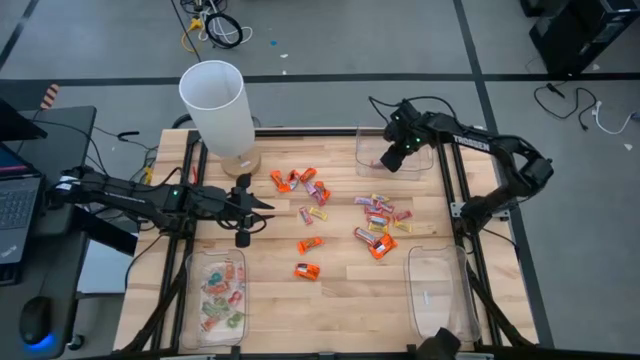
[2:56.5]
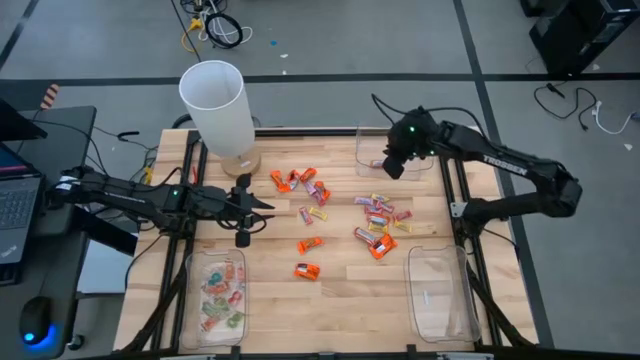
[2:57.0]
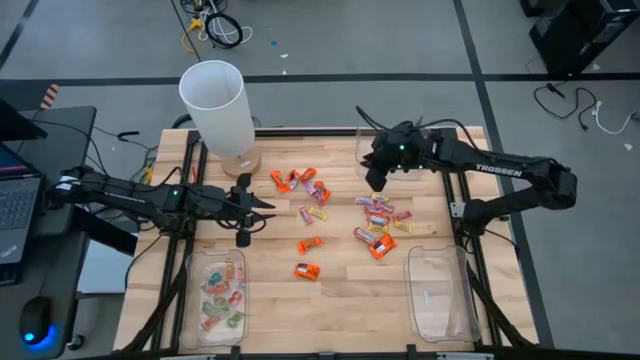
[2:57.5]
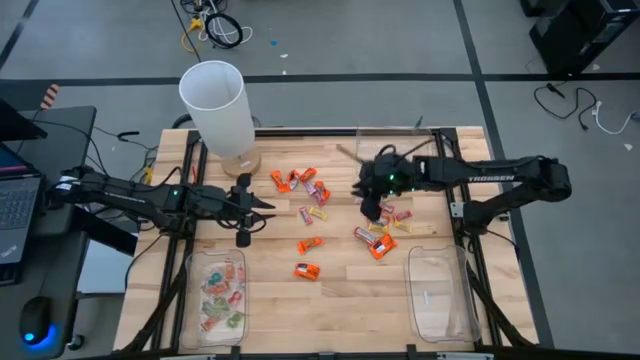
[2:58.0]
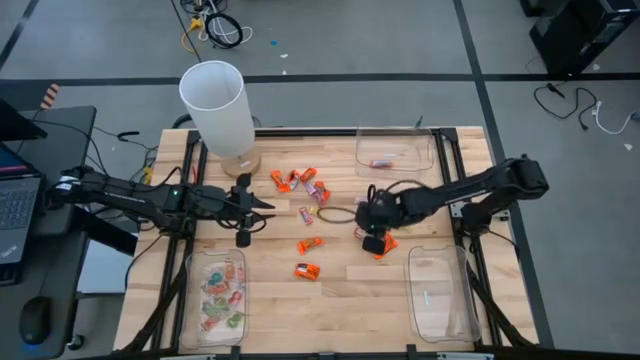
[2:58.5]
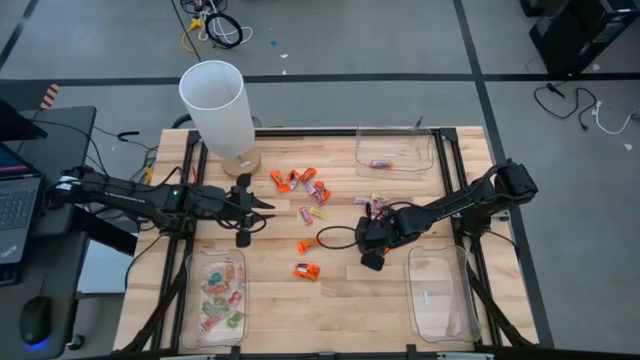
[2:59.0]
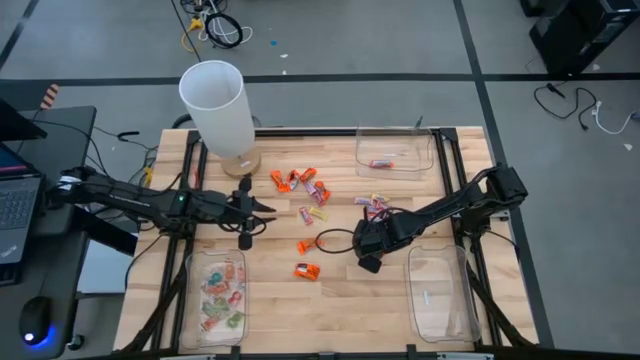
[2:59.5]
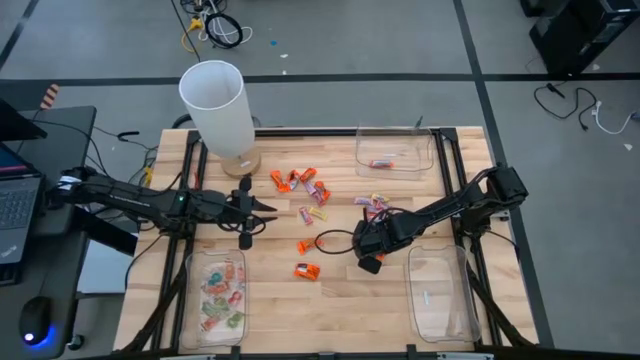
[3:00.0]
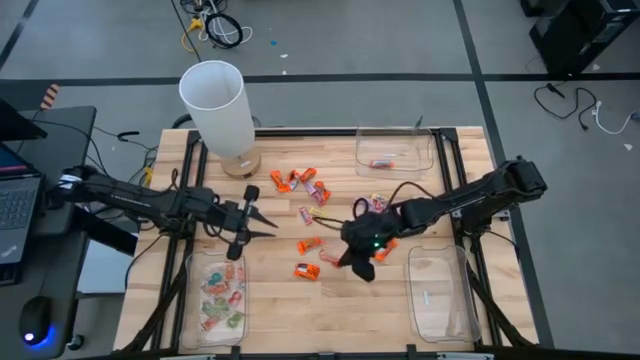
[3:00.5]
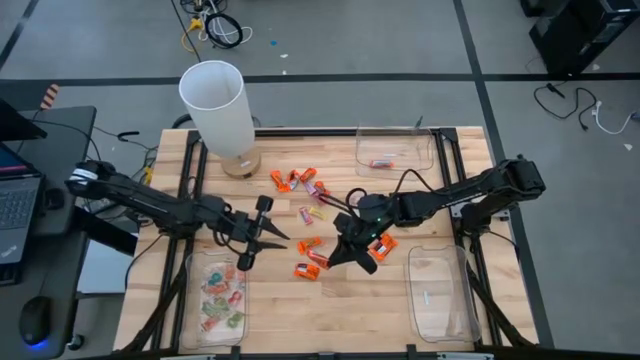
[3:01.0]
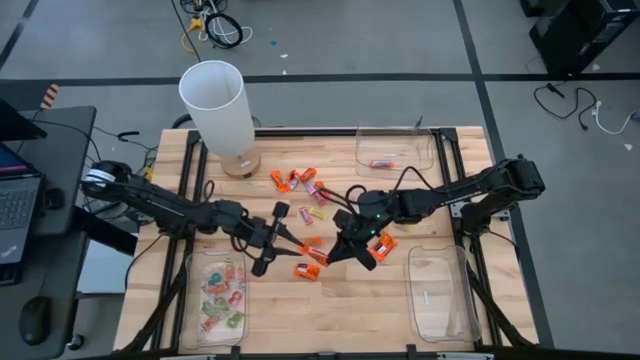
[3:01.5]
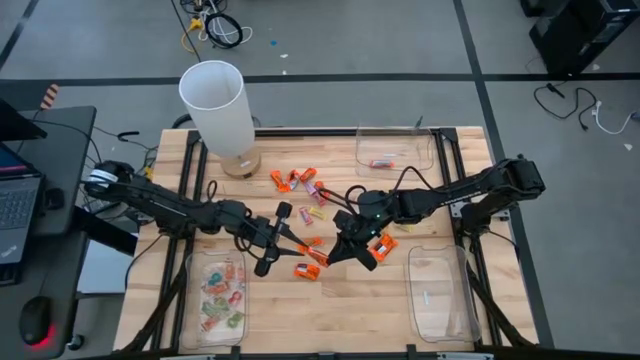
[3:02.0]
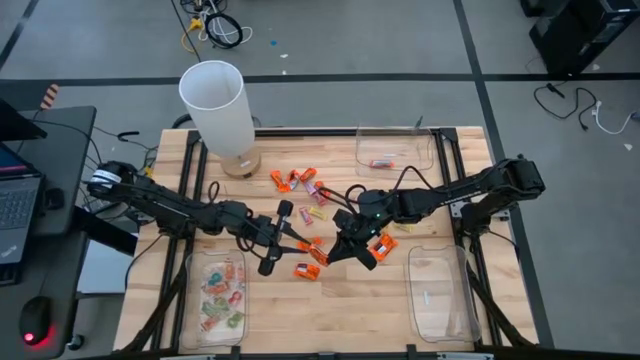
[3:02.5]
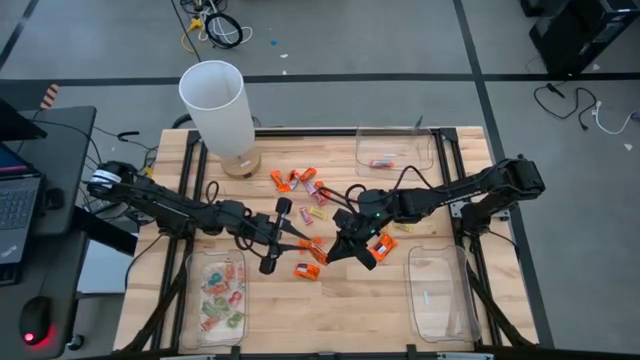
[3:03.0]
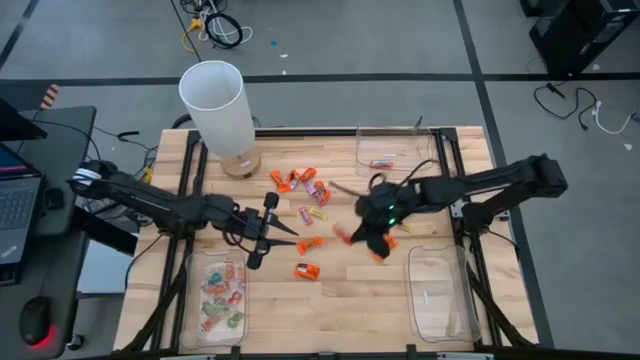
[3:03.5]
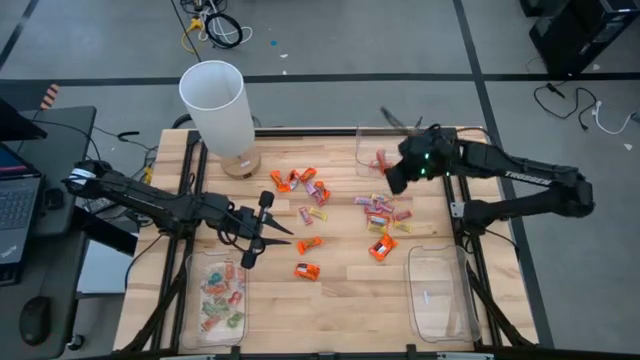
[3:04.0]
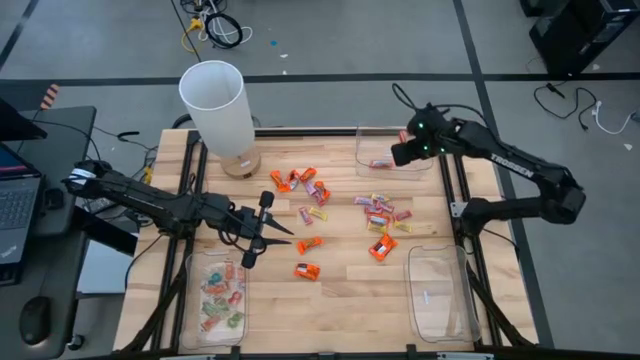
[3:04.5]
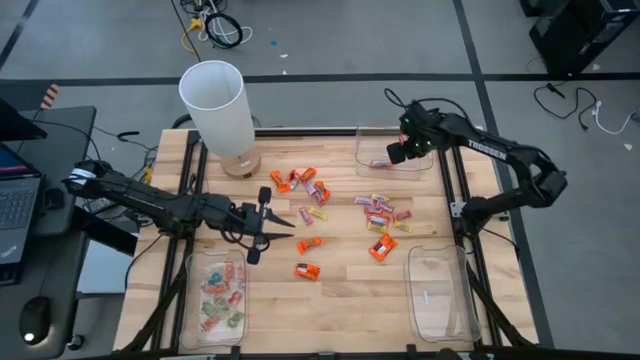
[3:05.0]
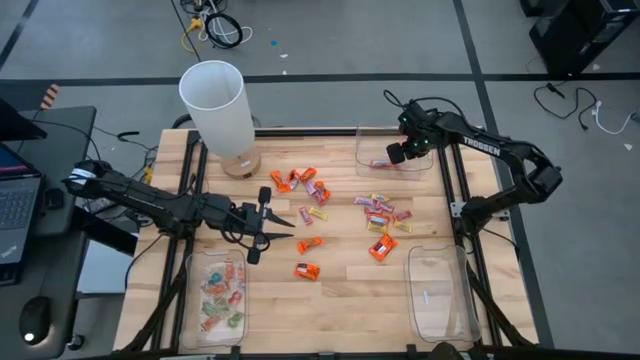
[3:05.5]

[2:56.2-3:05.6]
Task: Sort candy
Put the large orange chocolate bar into the top right transparent bin

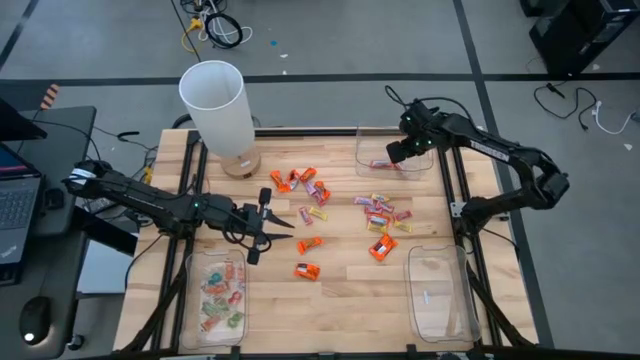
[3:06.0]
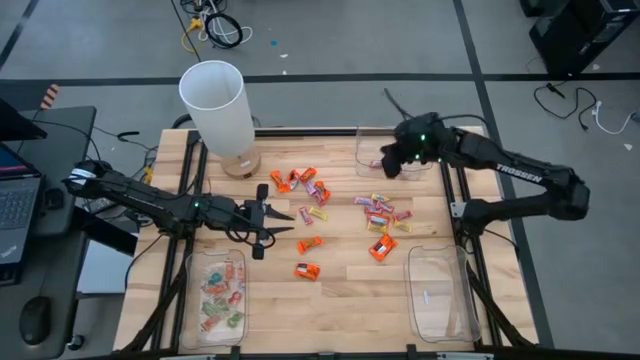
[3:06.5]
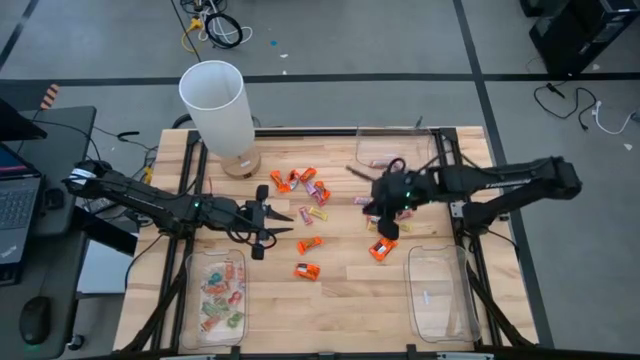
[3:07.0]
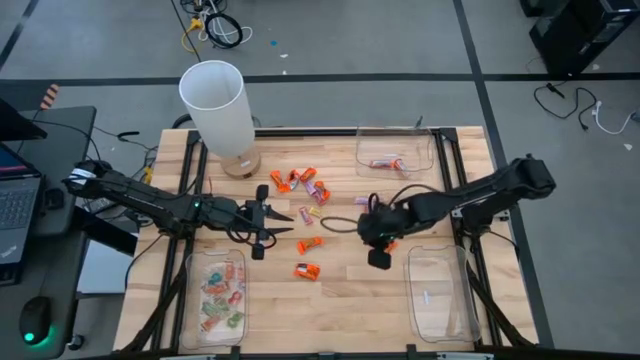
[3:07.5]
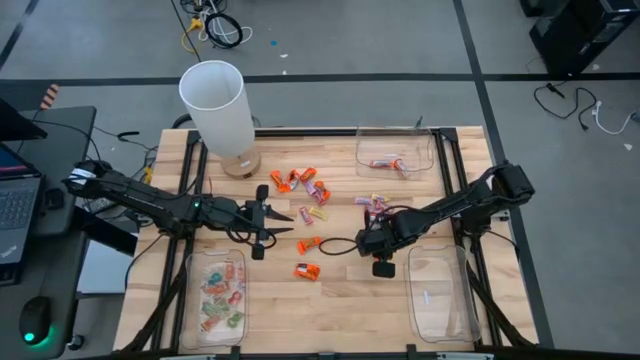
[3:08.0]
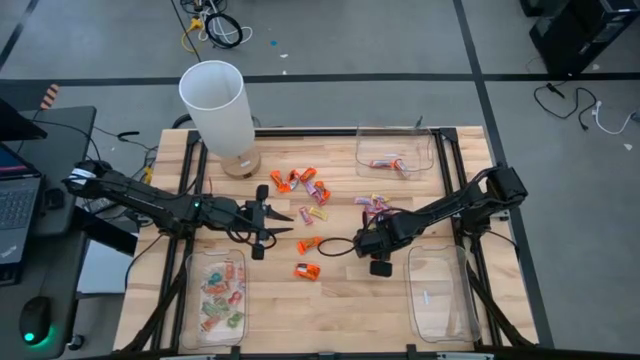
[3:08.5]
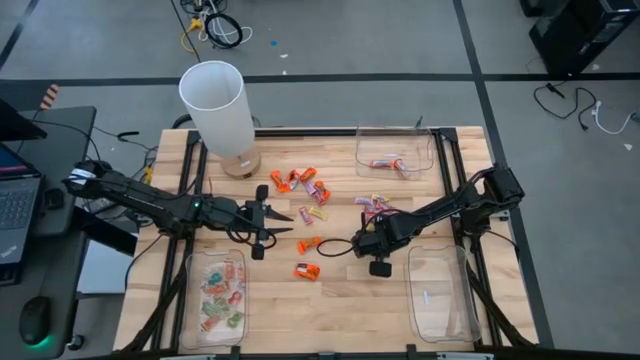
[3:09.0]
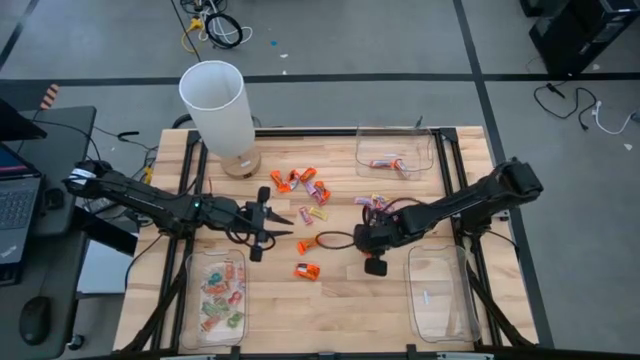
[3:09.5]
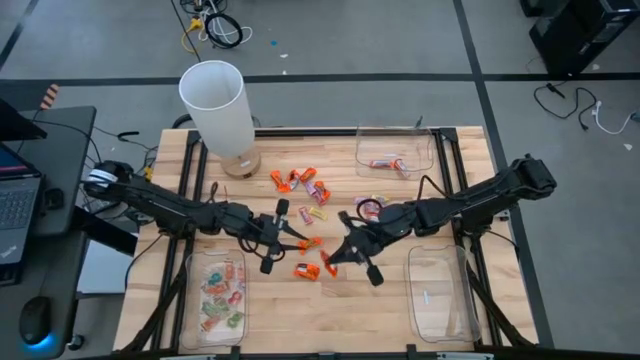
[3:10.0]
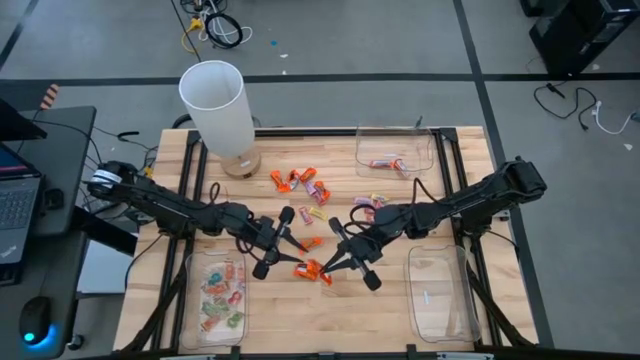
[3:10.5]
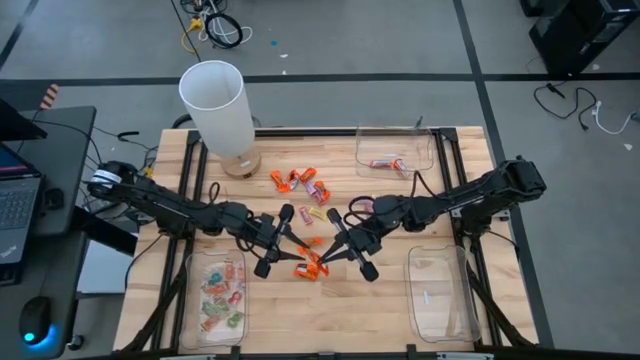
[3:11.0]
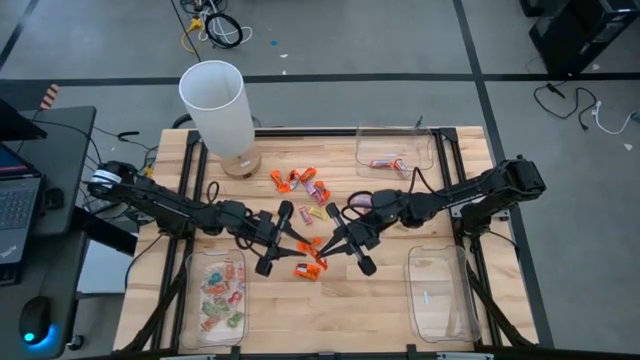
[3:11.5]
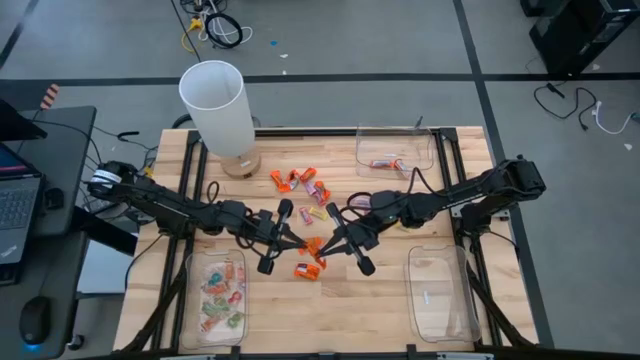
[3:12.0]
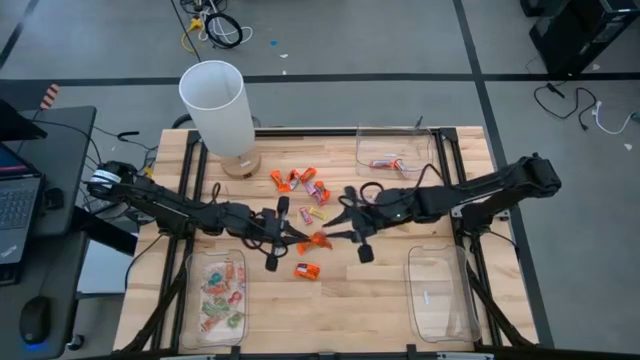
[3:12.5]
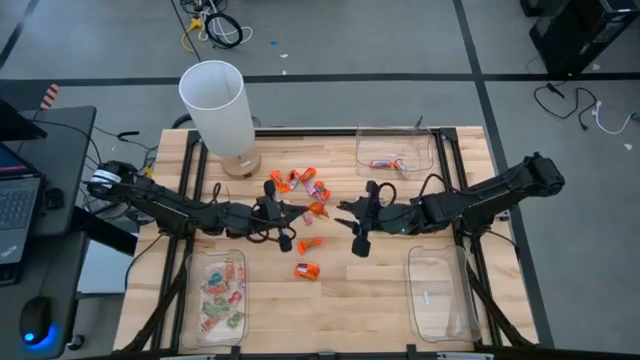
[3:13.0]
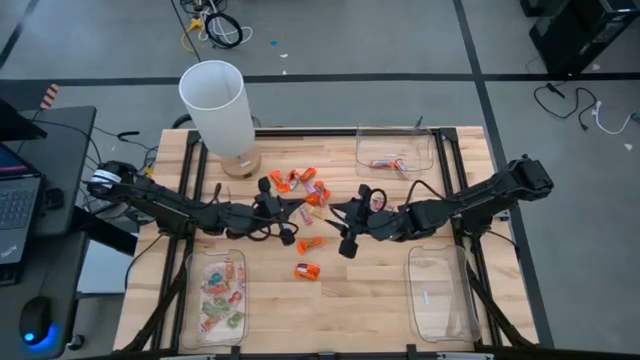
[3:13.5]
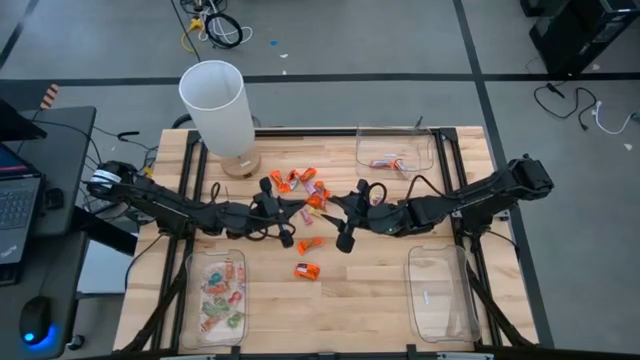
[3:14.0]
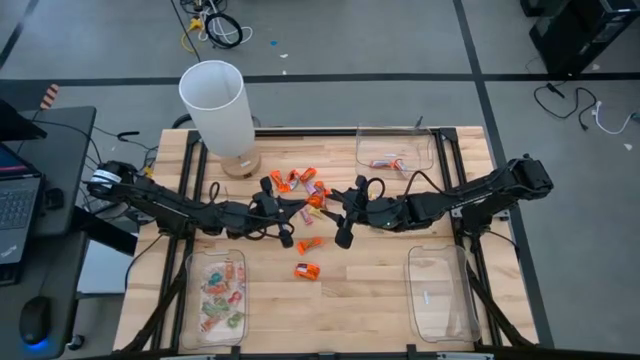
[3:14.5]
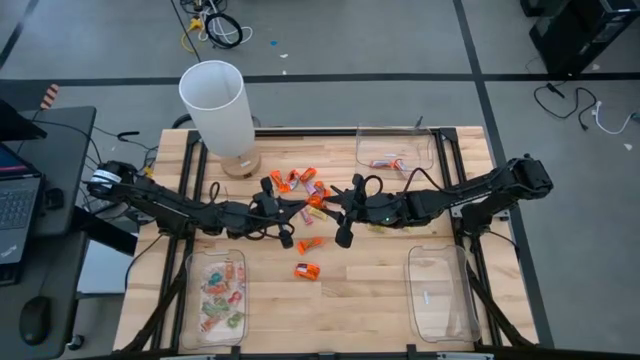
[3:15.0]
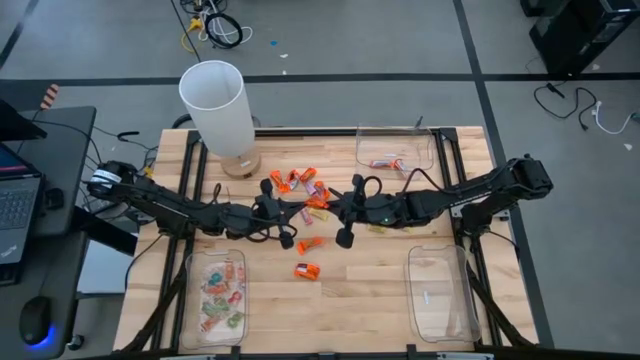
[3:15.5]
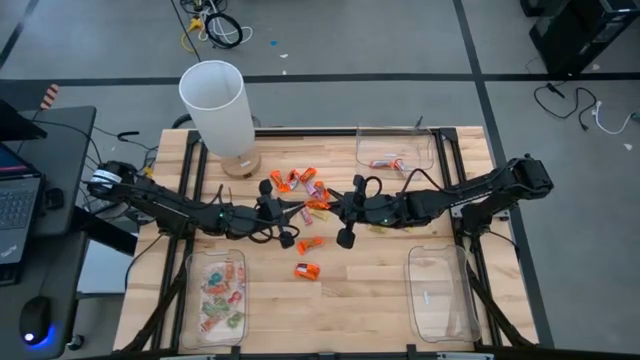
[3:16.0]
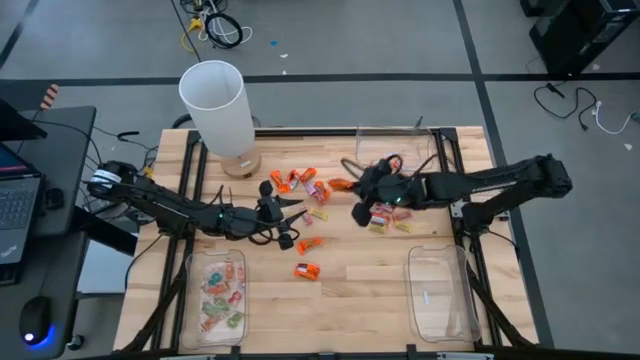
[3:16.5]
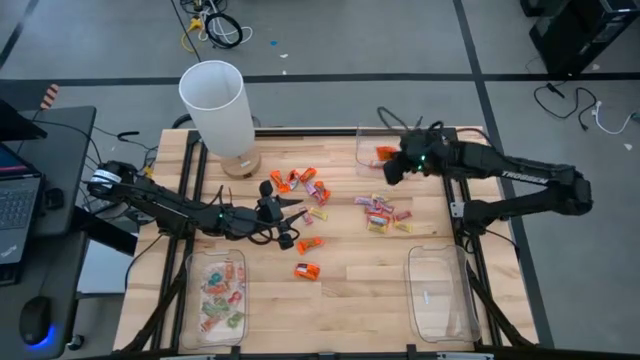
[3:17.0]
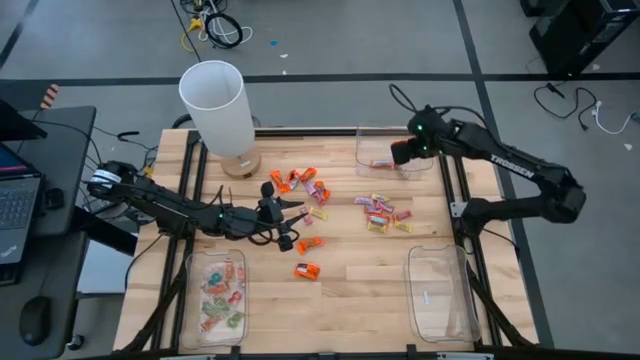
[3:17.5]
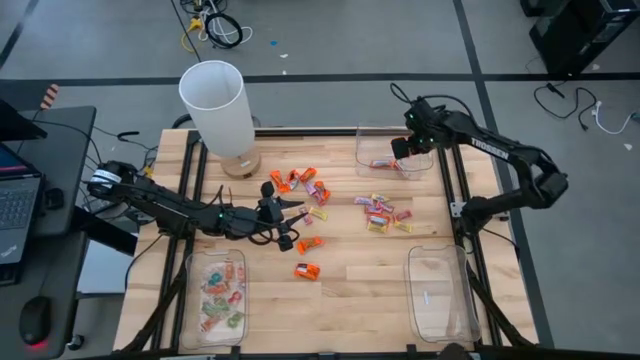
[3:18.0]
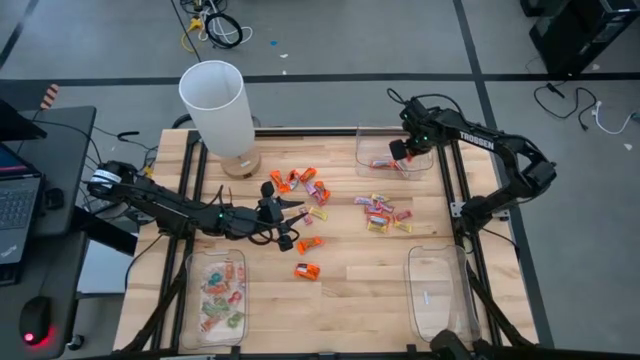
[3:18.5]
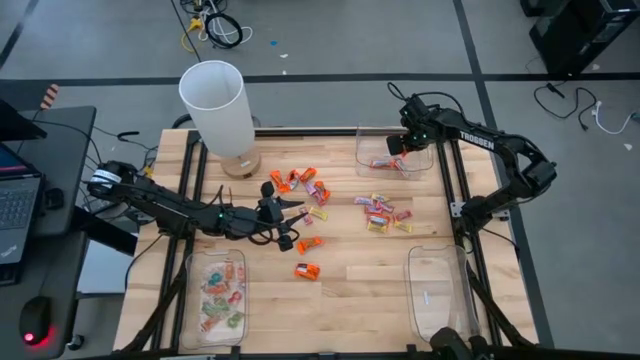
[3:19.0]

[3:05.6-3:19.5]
Put the small orange chocolate bar into the top right transparent bin
